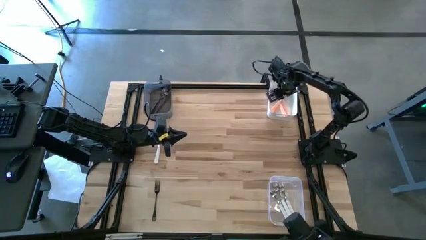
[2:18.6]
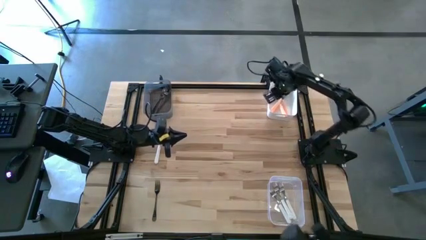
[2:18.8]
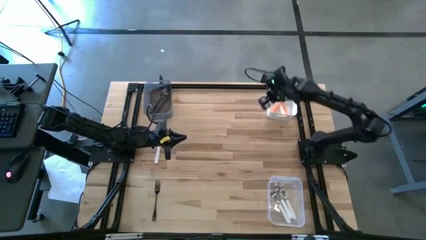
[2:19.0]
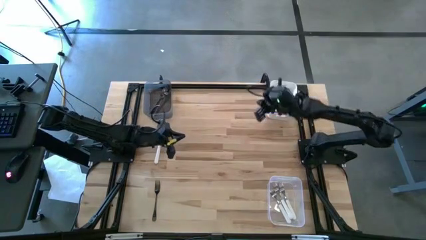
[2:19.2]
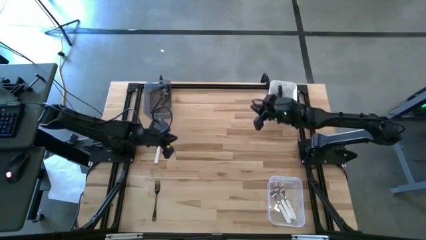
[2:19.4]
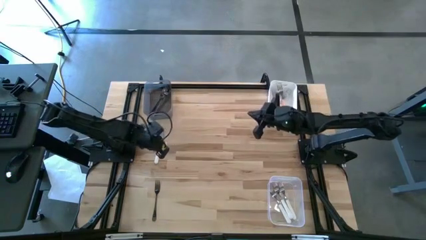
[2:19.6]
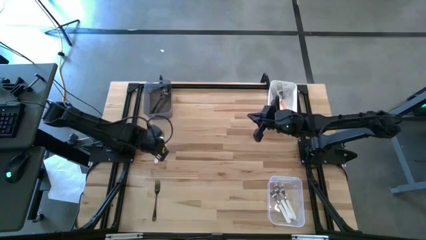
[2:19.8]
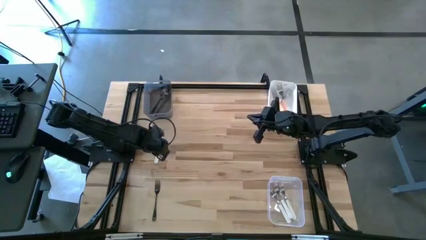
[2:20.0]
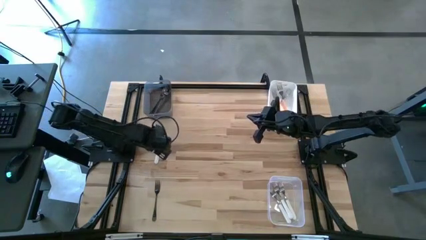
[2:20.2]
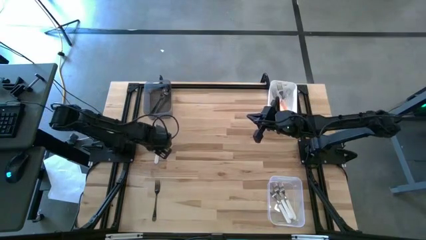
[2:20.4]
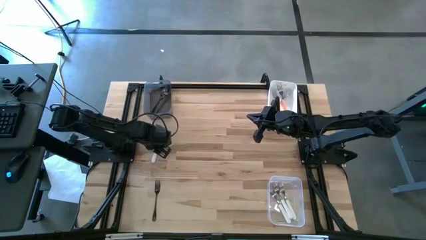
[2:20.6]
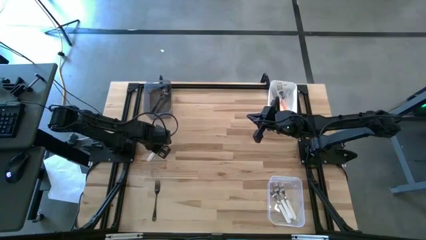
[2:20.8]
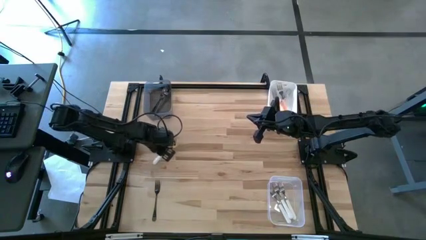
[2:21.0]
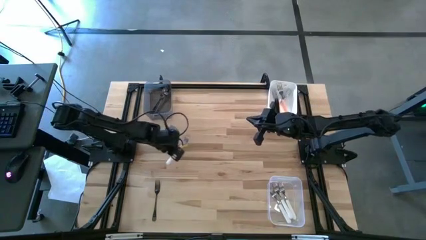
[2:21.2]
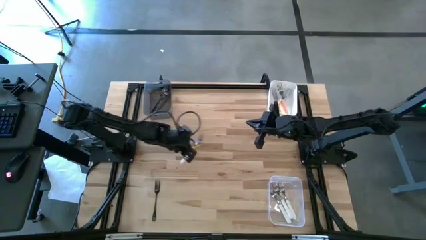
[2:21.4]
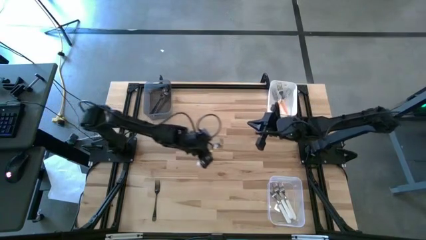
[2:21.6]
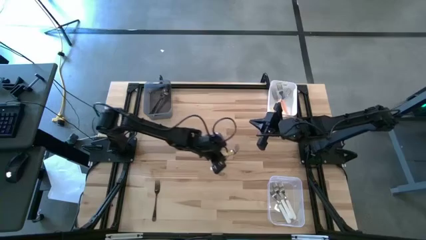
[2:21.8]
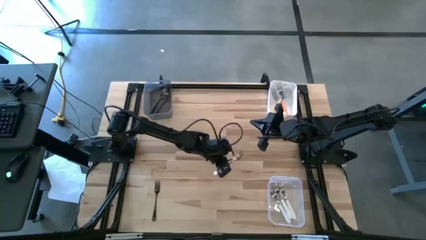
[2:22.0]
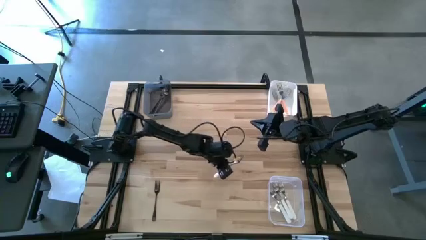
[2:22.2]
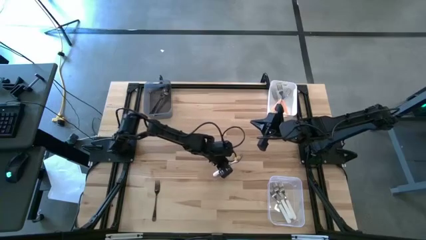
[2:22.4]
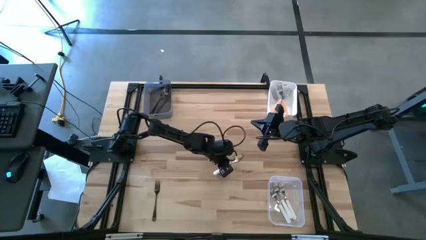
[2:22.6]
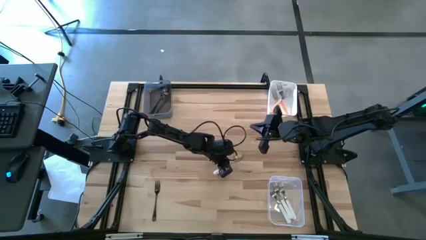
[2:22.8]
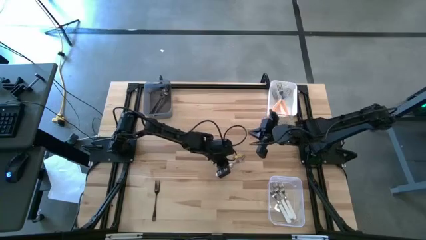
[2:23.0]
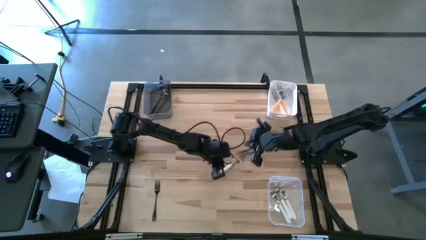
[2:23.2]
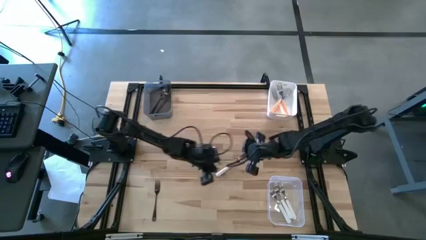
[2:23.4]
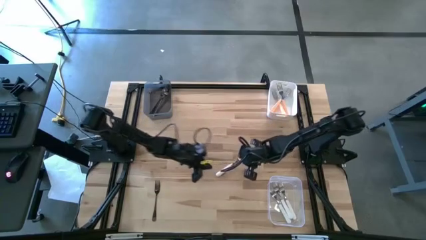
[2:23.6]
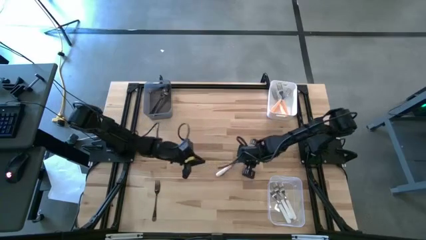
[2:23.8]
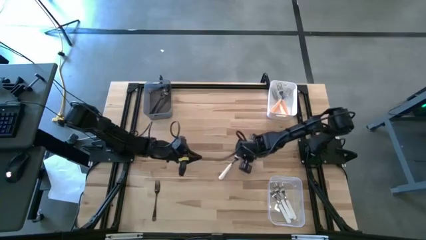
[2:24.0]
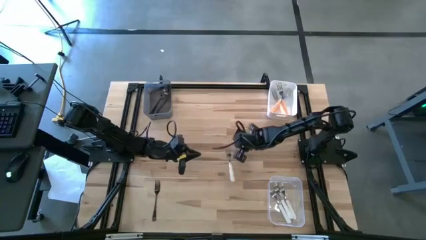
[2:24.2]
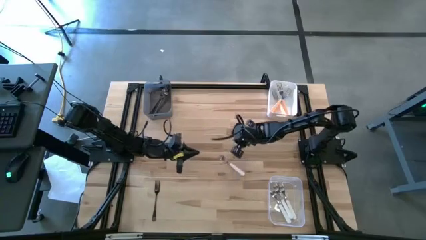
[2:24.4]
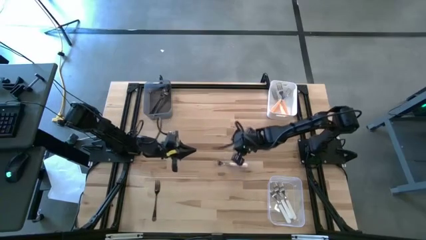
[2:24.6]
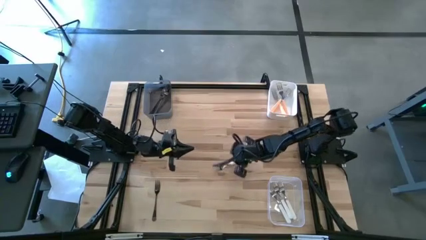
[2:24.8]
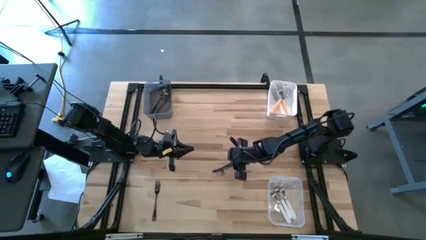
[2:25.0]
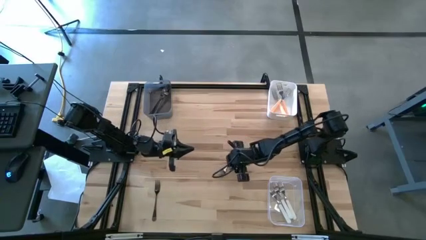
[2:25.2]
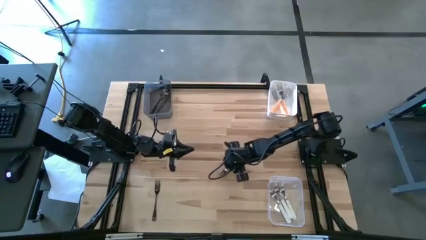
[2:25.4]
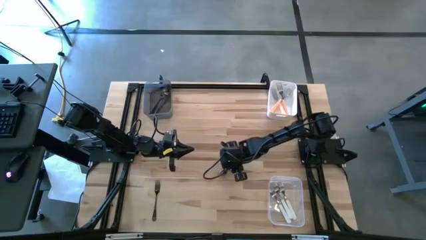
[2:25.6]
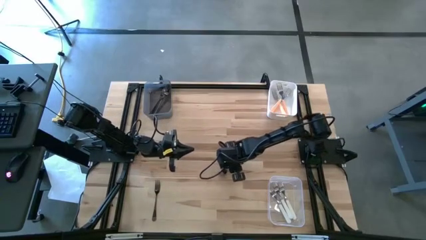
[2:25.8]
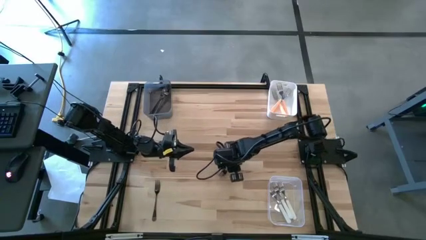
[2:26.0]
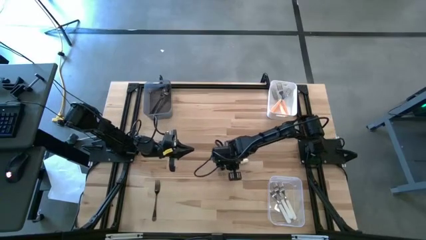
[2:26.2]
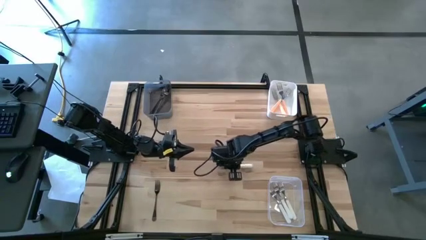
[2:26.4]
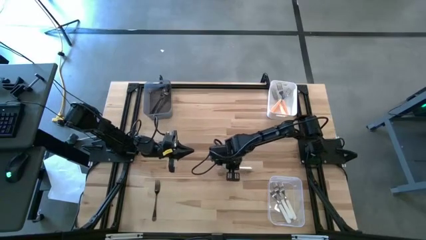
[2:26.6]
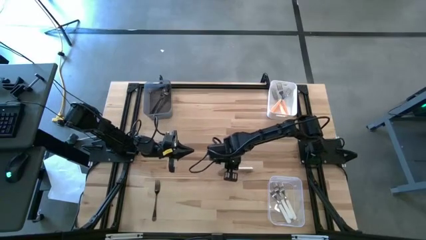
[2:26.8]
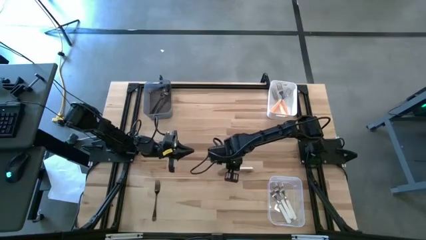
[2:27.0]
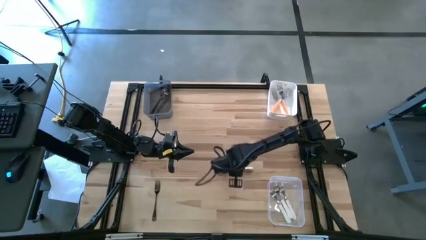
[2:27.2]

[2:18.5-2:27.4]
Task: Sort silverware by color (type)
Put the white fork into the transparent bin

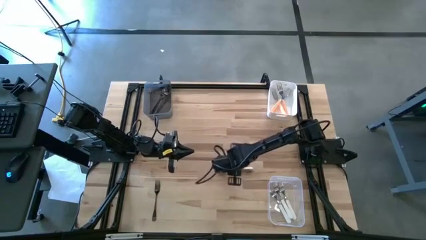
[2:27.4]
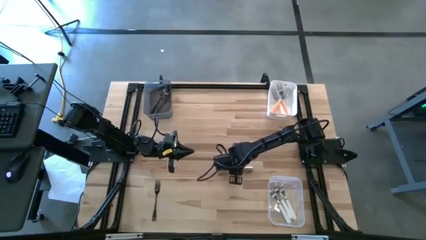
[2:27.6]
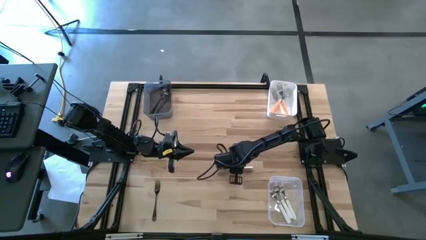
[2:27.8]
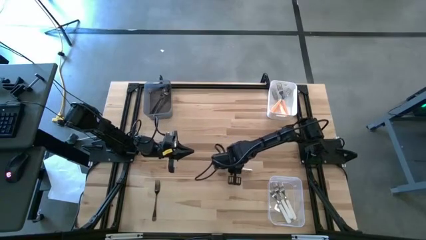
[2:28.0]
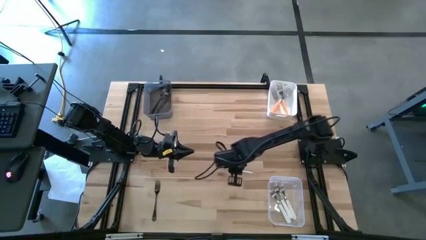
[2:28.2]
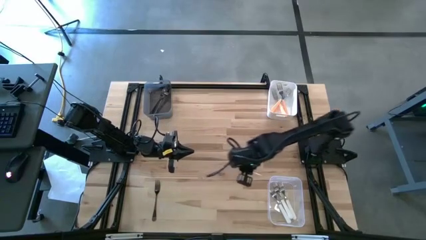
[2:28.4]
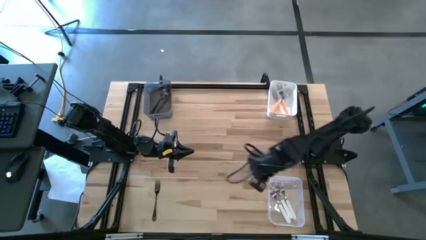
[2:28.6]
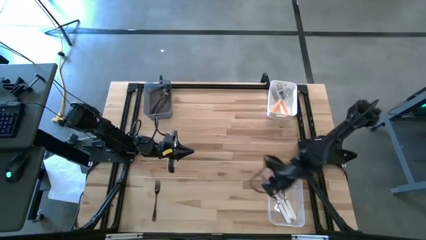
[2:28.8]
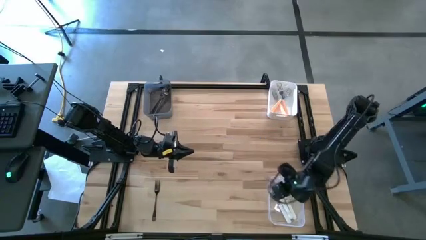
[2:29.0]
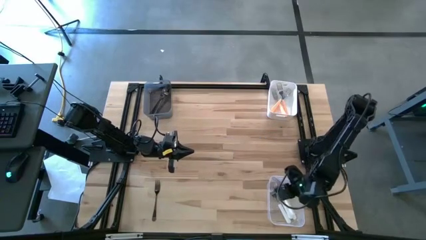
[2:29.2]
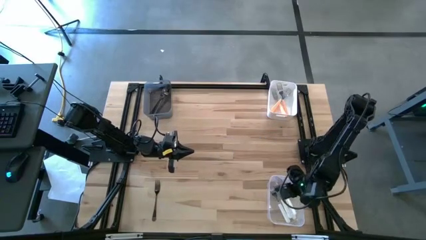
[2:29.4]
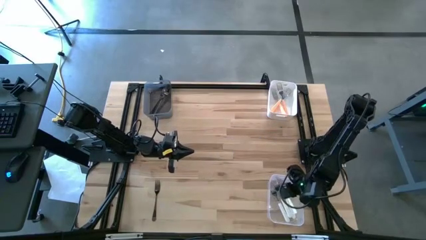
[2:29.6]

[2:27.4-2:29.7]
Put the white fork into the transparent bin

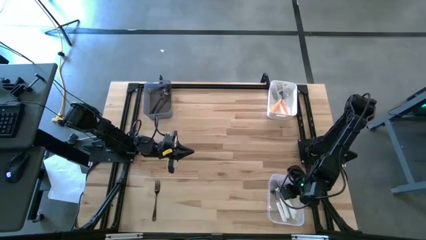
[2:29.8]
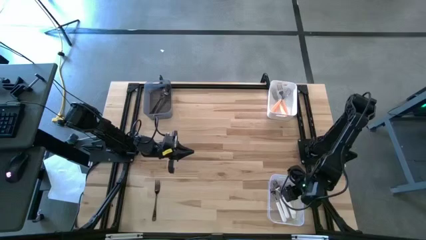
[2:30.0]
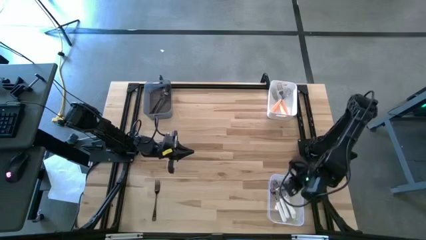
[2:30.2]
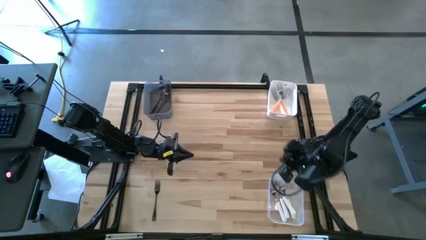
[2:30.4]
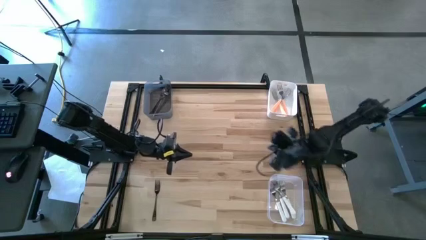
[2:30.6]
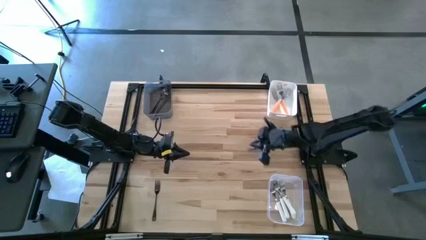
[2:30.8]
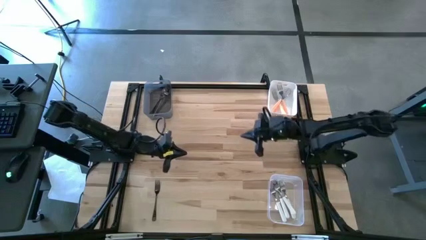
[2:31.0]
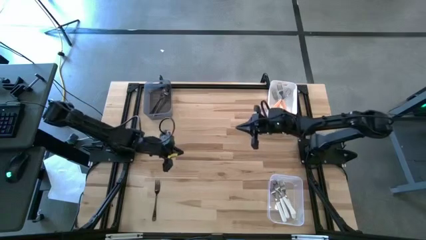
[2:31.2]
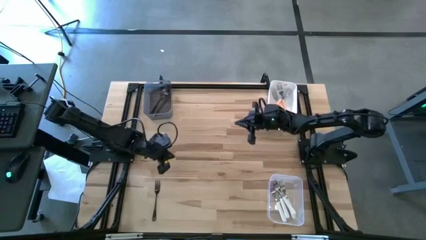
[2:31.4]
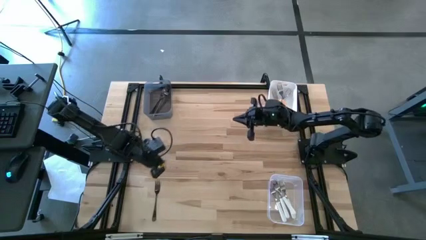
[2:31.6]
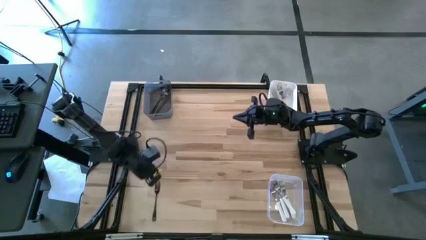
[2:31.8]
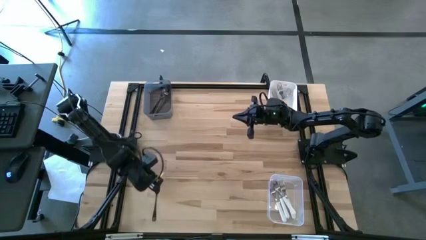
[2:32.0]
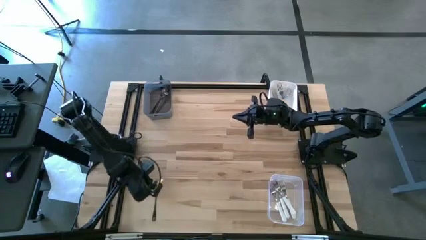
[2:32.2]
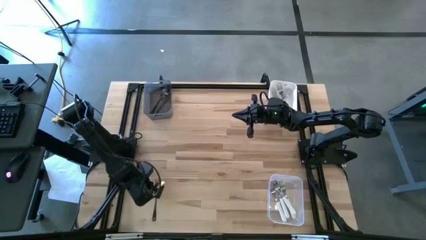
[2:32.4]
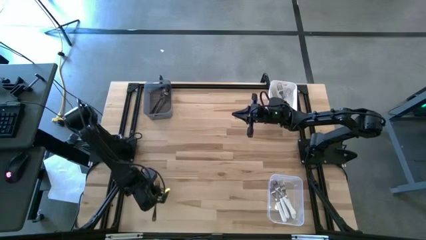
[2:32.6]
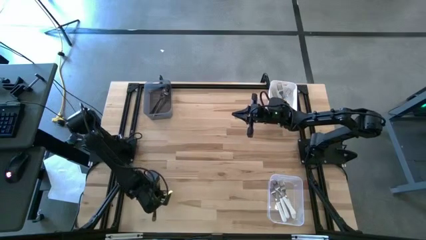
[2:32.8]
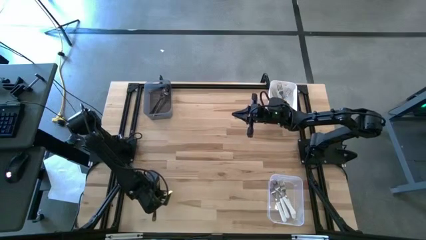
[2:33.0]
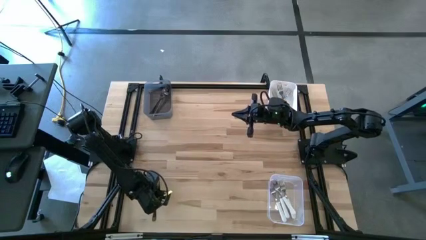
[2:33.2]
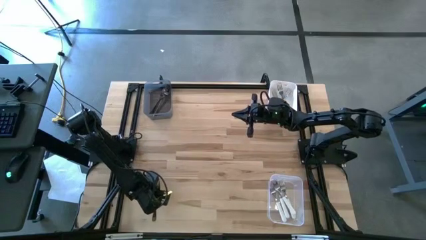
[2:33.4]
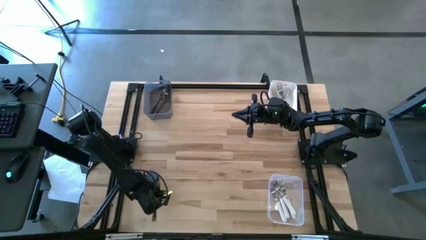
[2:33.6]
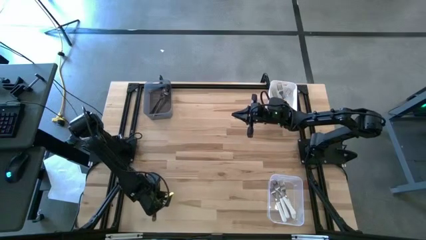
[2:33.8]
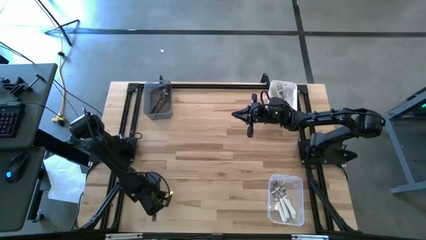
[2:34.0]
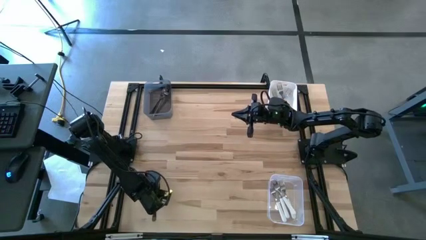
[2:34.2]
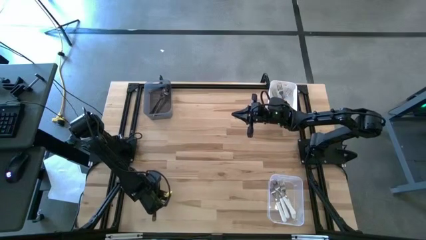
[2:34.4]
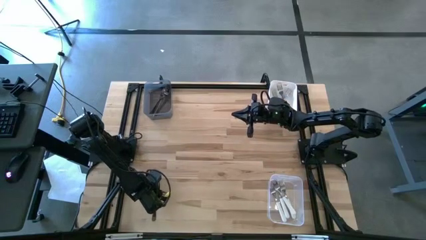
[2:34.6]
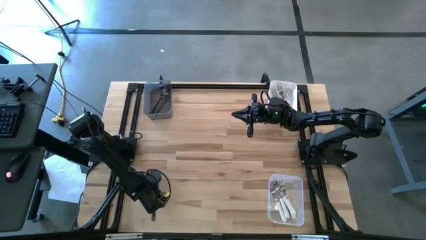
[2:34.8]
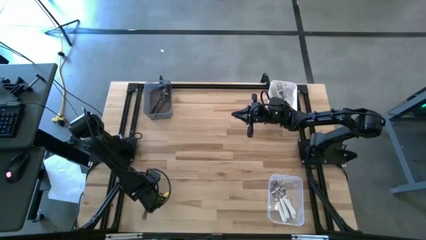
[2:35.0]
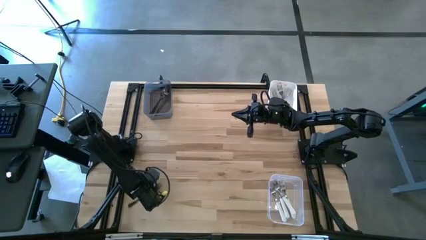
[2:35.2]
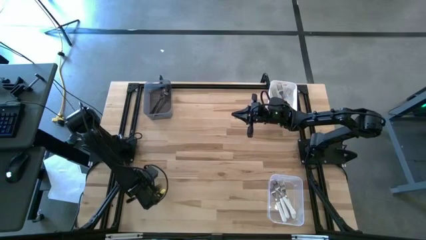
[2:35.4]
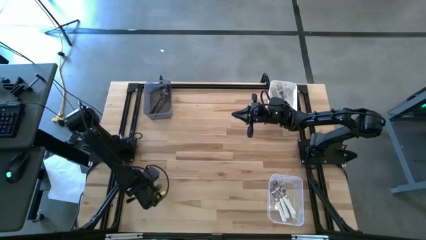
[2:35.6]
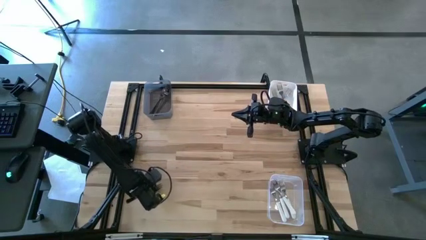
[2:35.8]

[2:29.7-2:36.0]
Put the black fork into the black bin
